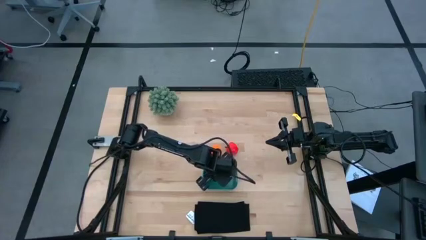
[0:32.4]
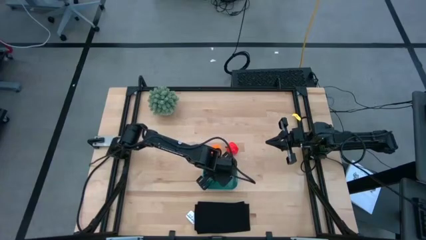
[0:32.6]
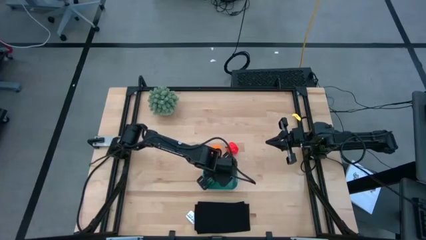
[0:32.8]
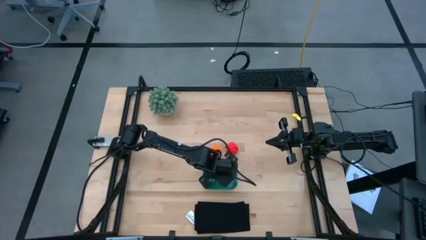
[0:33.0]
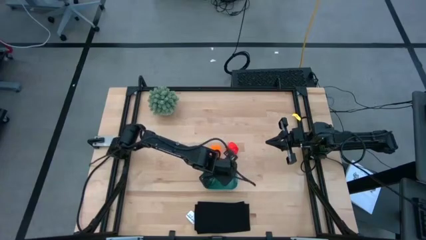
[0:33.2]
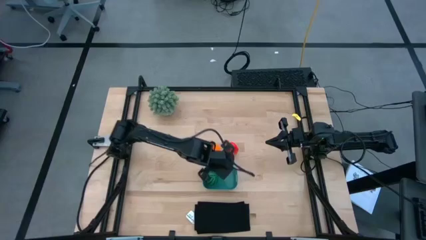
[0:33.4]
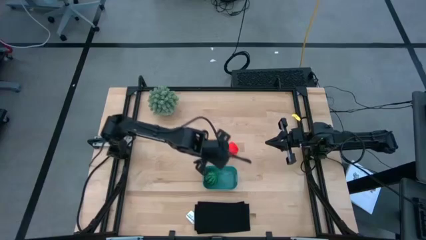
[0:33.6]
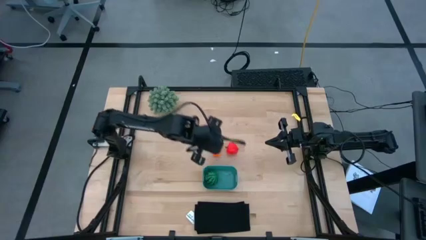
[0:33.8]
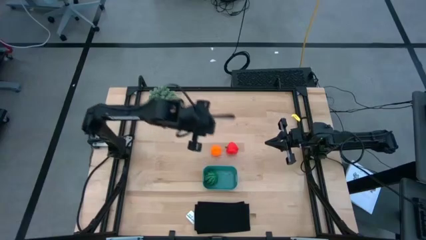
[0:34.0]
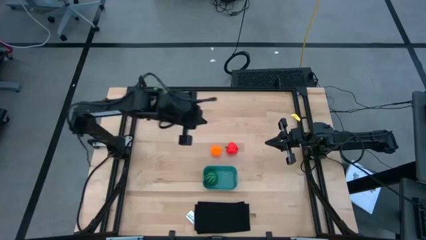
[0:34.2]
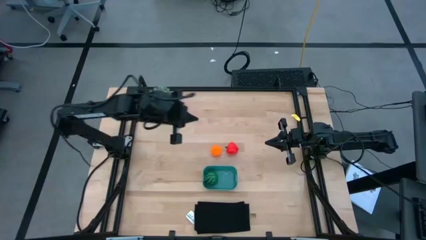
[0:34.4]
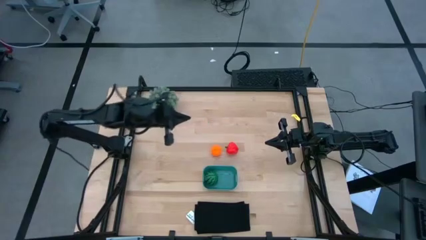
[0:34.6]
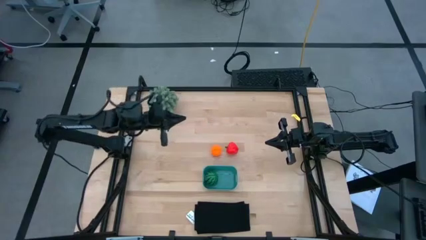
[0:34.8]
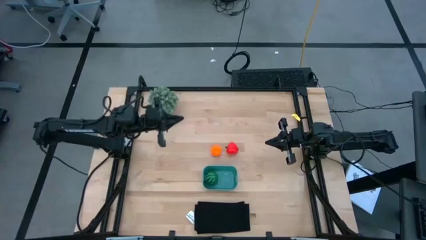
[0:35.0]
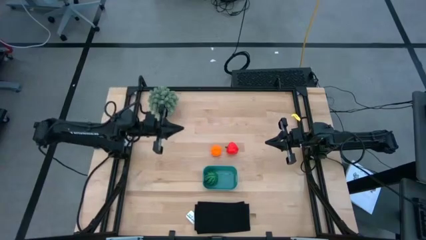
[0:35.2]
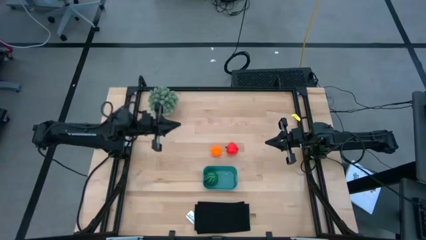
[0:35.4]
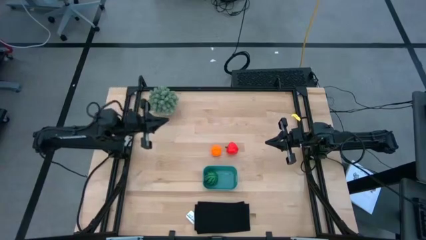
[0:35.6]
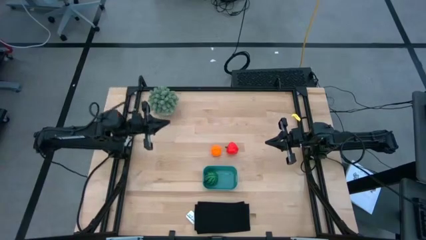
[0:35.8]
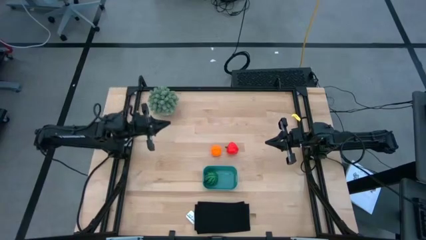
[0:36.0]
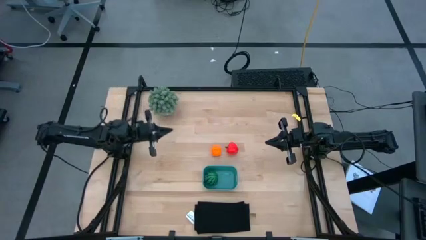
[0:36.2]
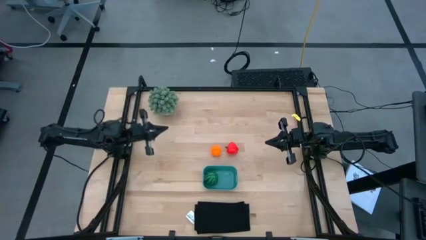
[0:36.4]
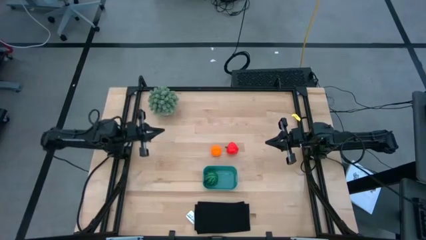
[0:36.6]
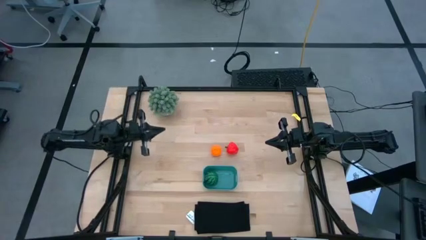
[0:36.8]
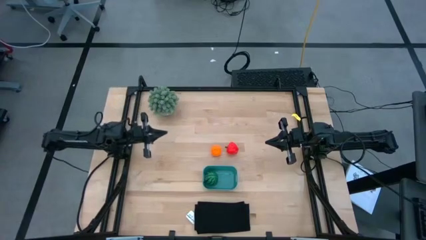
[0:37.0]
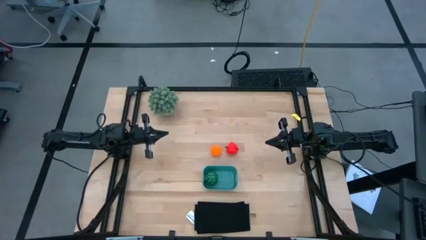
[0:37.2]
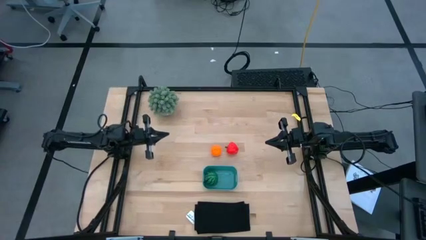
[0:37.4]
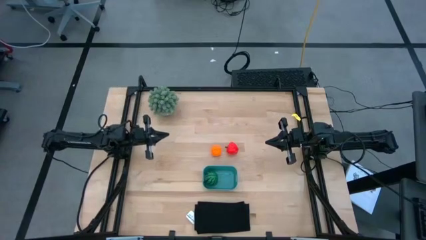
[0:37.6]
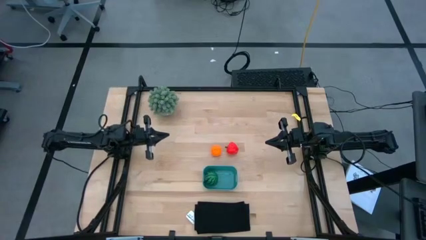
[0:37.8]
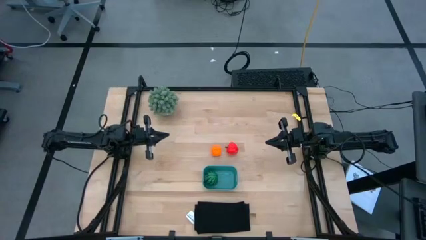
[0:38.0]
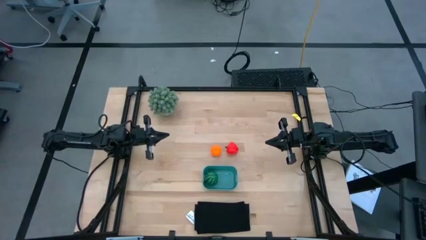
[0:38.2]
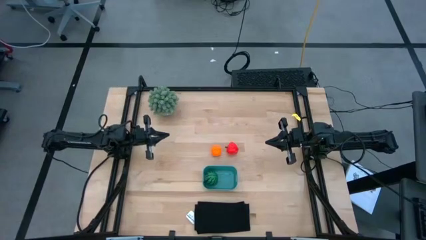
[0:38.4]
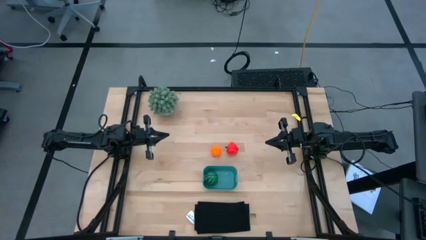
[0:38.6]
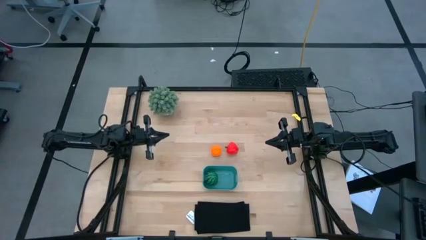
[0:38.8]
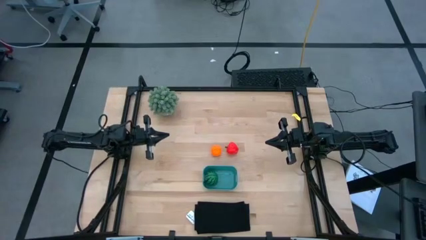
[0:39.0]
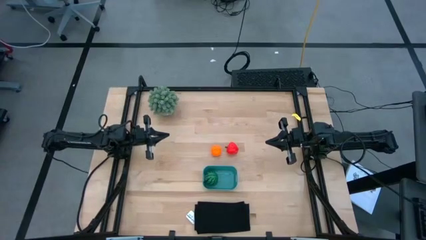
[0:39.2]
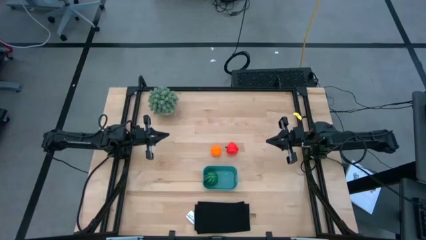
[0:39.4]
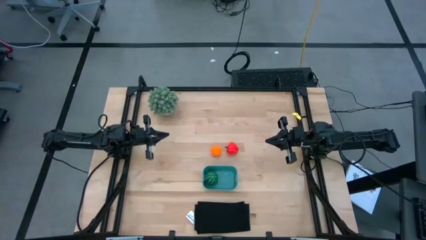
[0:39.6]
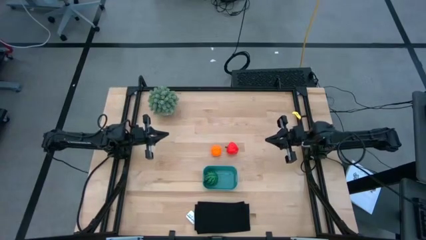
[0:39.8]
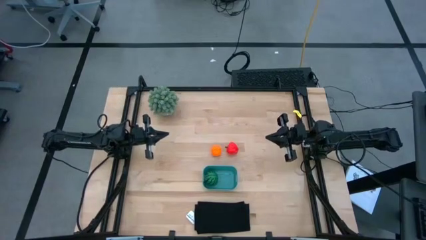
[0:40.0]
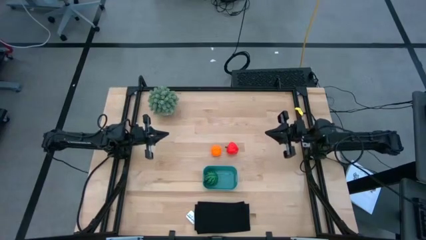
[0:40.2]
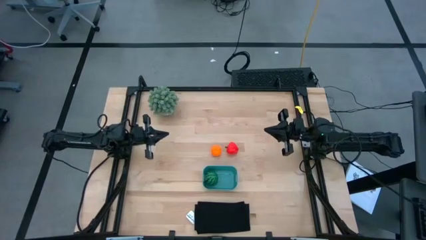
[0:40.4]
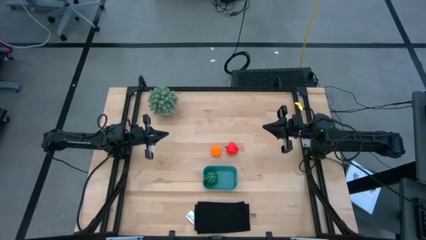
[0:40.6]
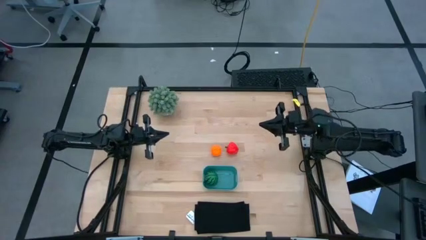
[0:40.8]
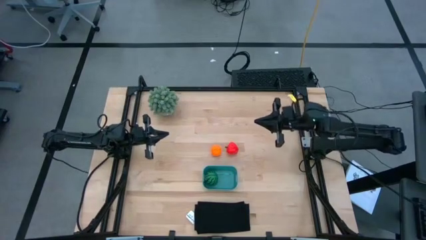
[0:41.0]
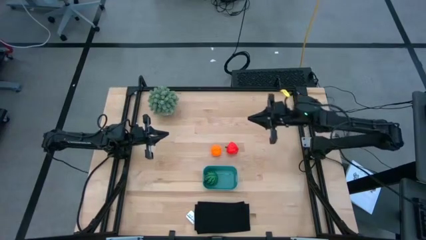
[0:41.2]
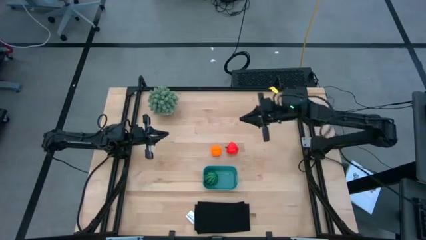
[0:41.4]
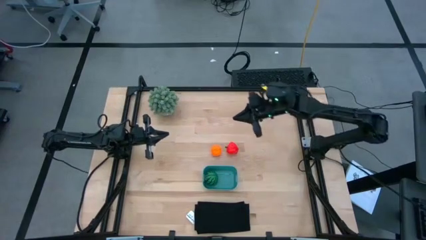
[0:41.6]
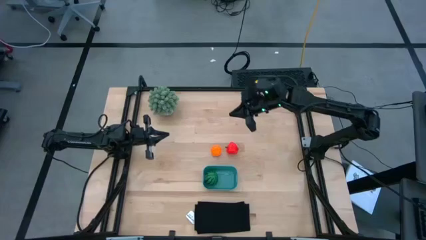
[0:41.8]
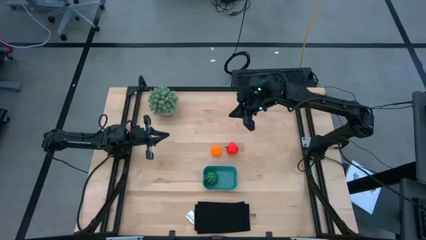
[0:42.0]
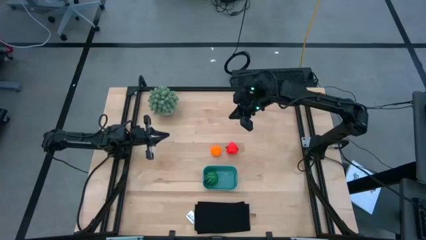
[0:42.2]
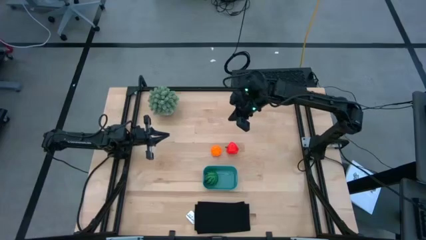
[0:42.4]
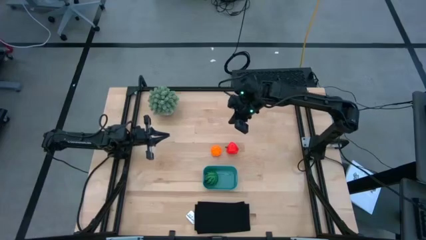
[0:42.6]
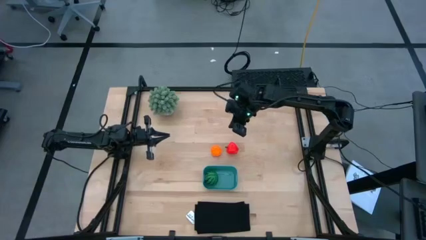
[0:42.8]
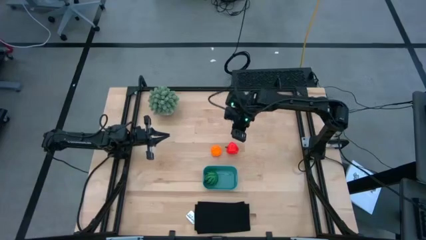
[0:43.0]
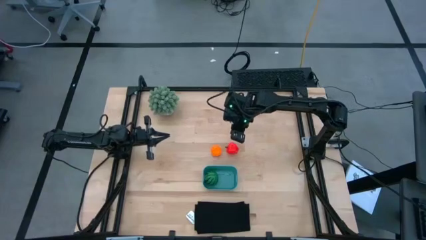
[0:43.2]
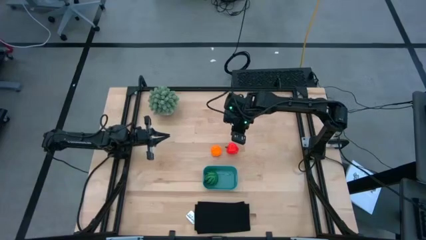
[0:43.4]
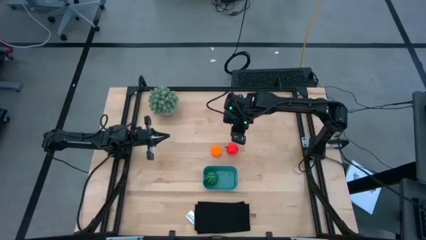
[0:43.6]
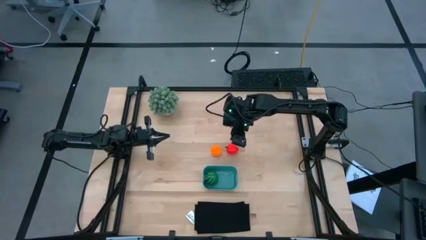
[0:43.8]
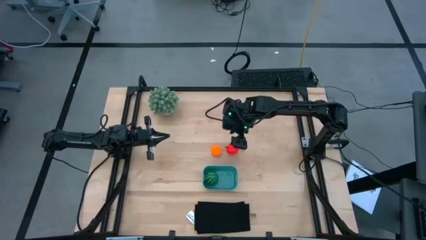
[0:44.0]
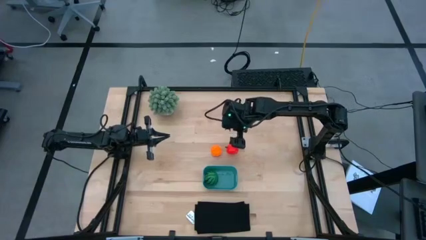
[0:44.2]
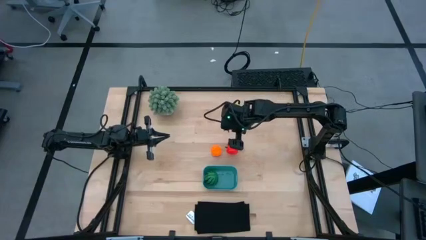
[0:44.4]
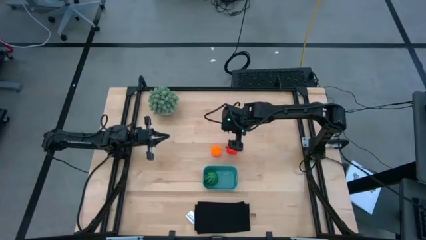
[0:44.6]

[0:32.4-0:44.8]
Task: Pick and placing Produce into tupperware
Put the apple into the blue bin

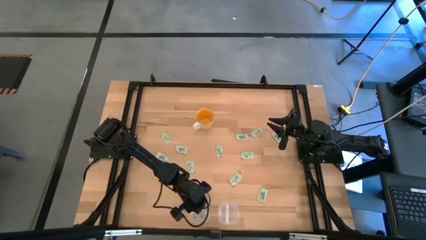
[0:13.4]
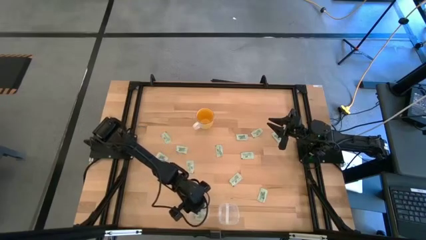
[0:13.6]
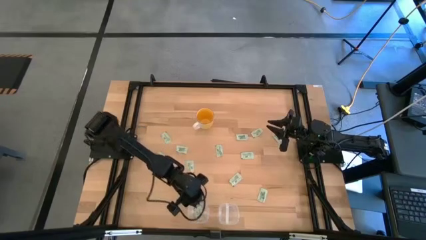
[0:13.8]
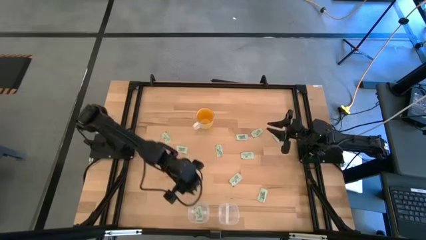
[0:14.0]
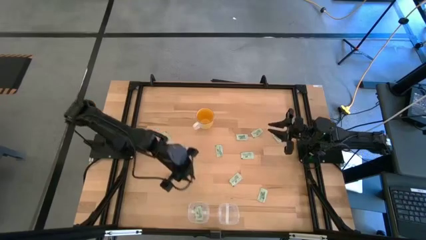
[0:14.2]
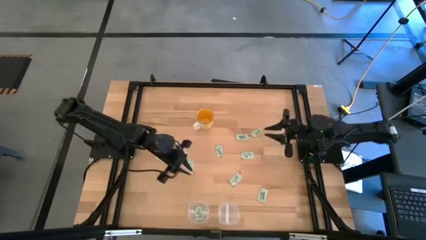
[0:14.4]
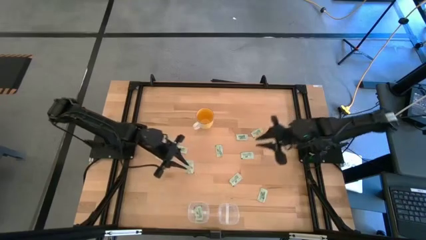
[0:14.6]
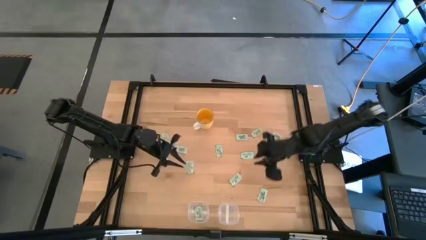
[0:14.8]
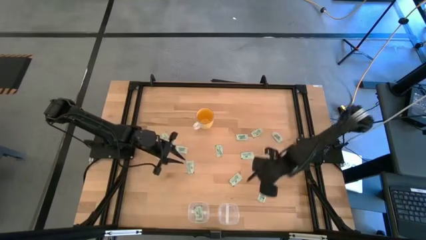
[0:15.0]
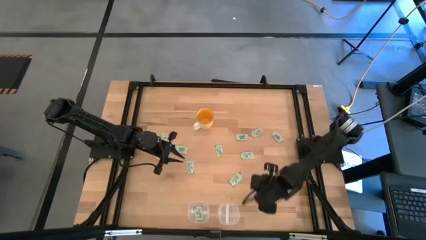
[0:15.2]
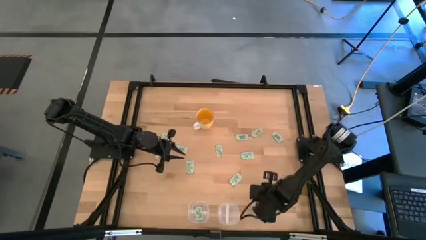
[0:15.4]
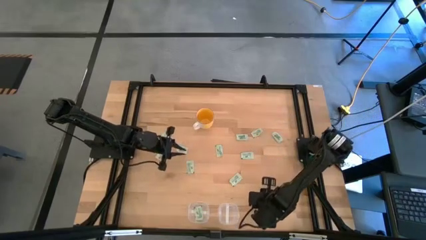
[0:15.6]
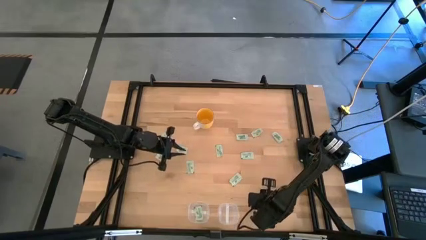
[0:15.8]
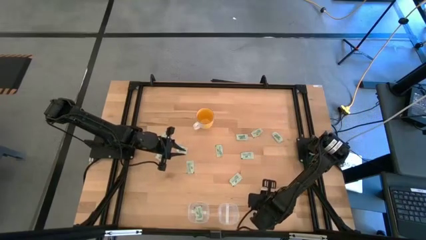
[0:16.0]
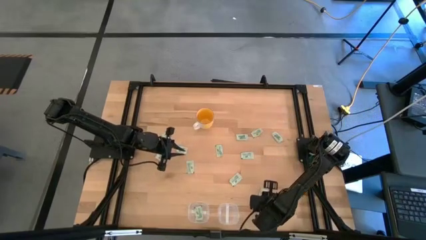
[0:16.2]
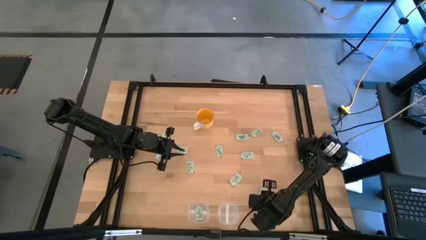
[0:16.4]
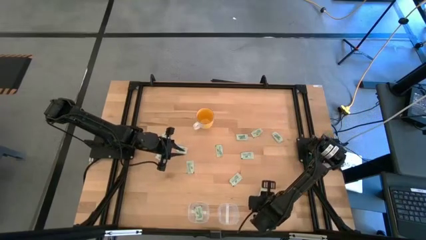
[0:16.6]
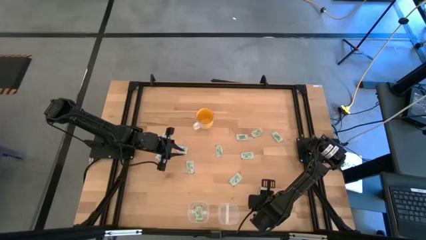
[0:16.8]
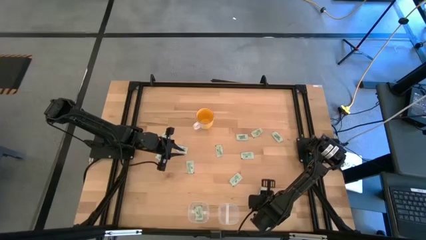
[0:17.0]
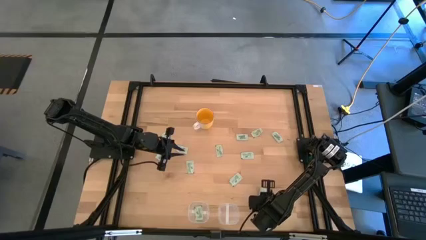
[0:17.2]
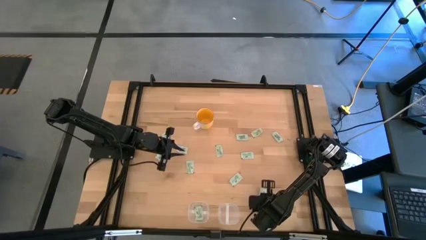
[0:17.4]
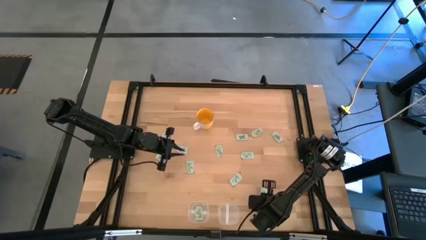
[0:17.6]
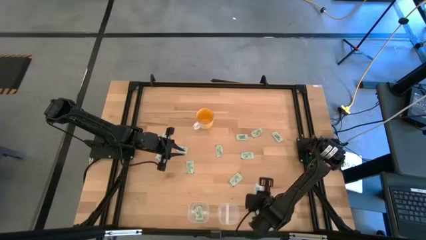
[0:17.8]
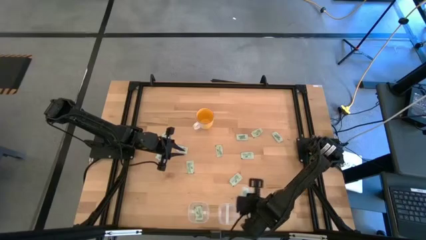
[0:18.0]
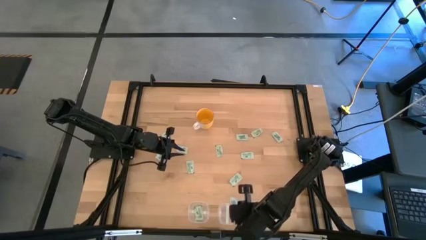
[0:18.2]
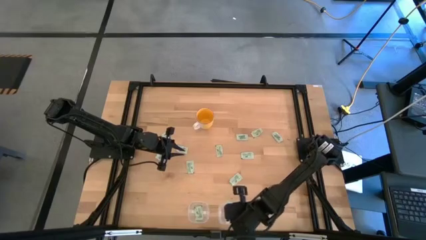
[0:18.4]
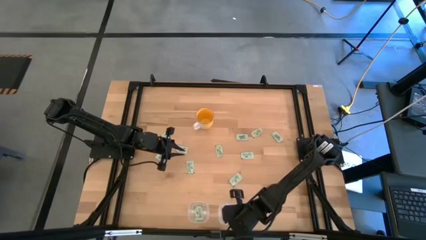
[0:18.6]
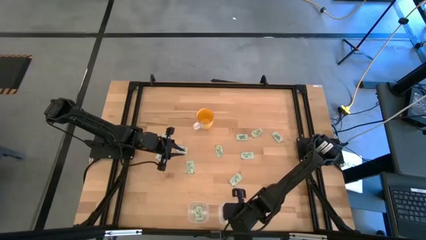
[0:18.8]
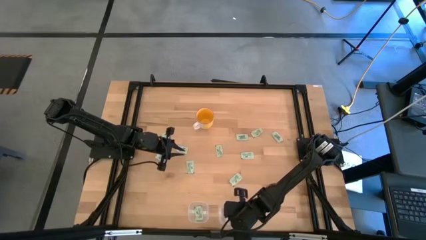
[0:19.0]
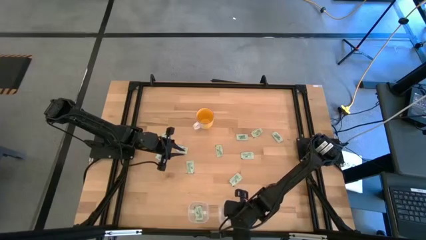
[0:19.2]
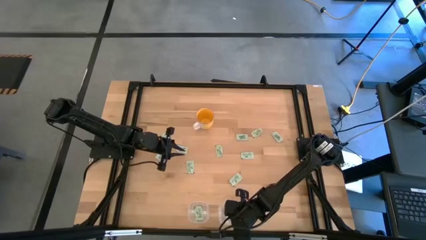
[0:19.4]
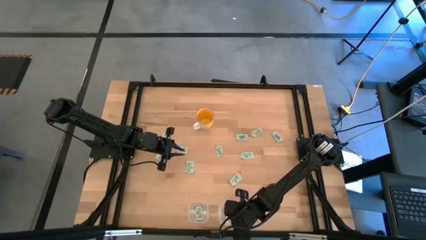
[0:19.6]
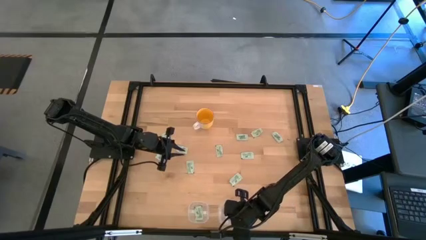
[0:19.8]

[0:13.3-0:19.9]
Task: Pick and place items into bin
Put the green stevia packet into the right transparent bin
